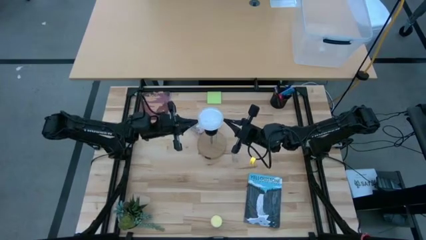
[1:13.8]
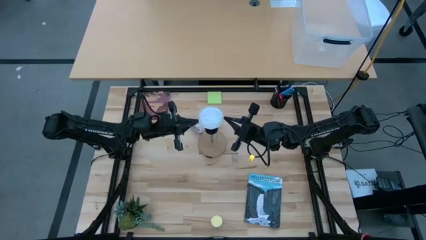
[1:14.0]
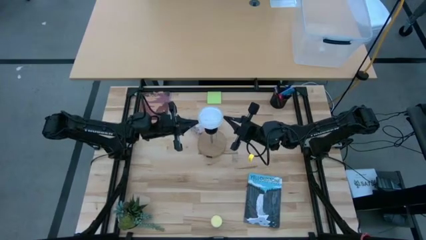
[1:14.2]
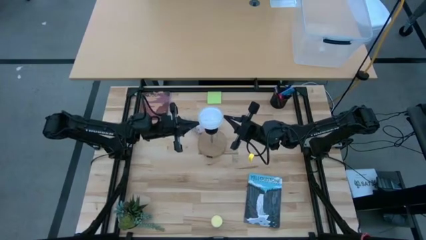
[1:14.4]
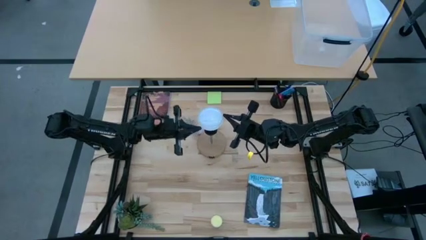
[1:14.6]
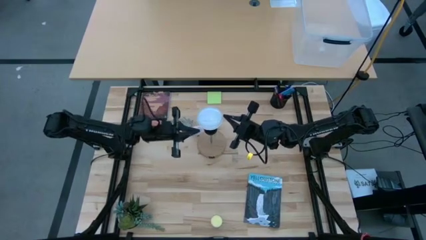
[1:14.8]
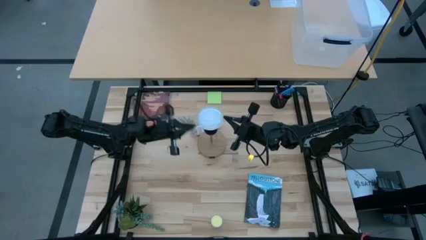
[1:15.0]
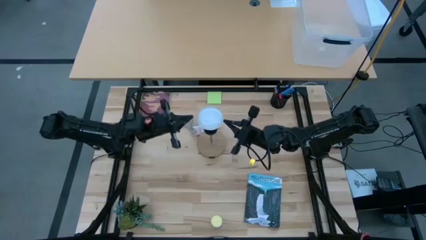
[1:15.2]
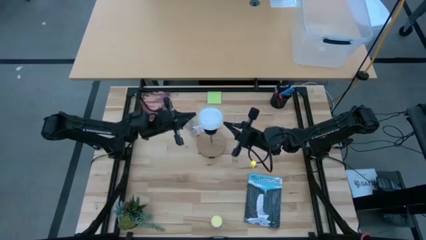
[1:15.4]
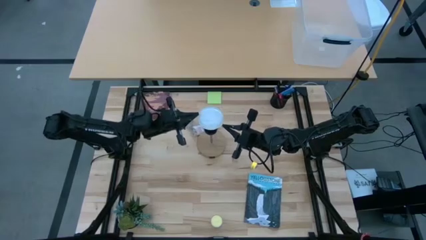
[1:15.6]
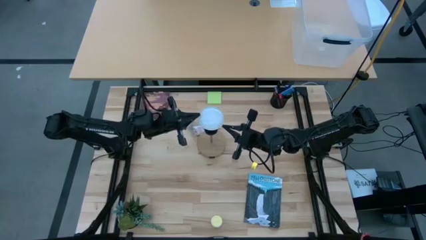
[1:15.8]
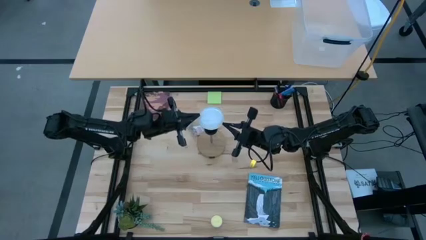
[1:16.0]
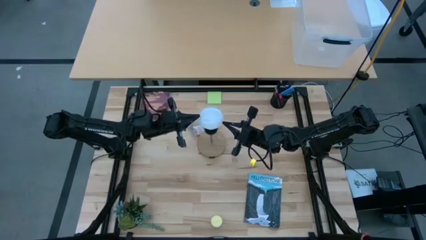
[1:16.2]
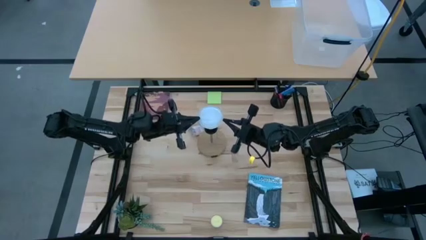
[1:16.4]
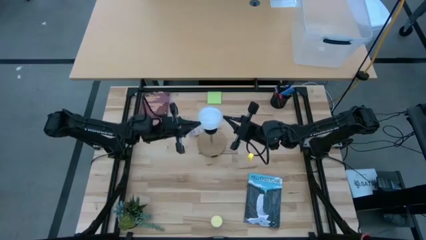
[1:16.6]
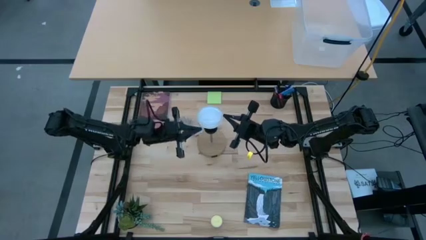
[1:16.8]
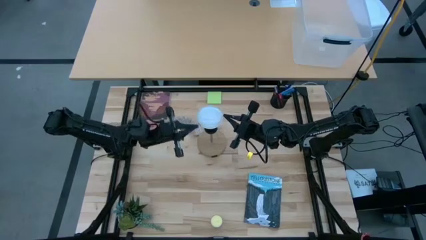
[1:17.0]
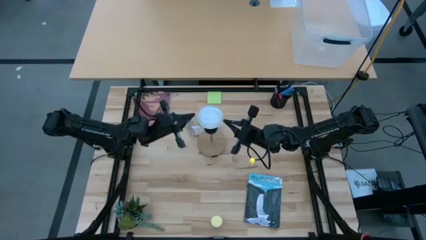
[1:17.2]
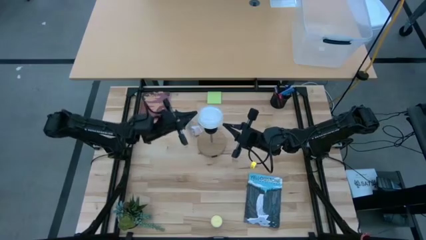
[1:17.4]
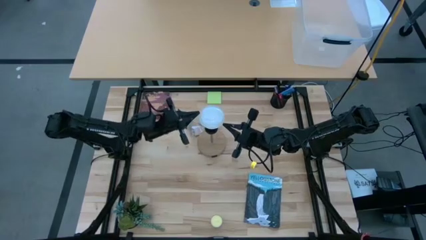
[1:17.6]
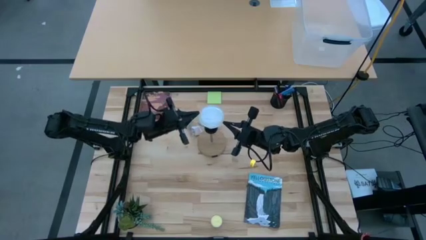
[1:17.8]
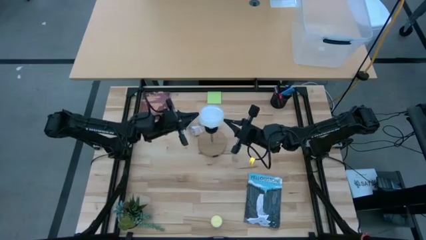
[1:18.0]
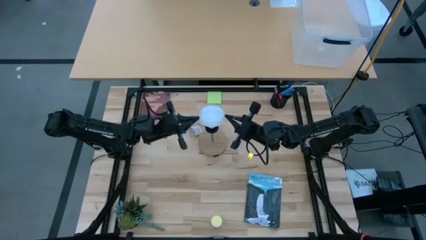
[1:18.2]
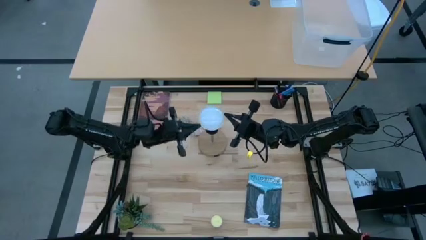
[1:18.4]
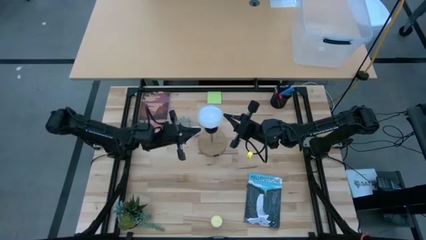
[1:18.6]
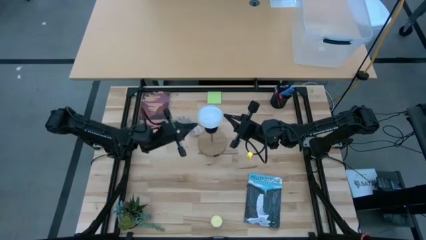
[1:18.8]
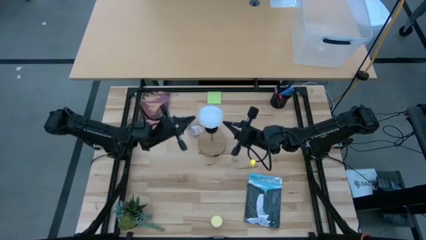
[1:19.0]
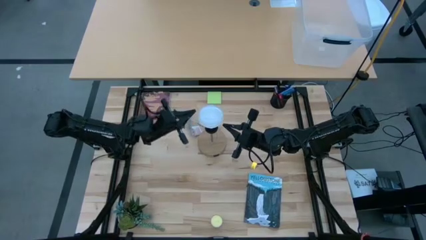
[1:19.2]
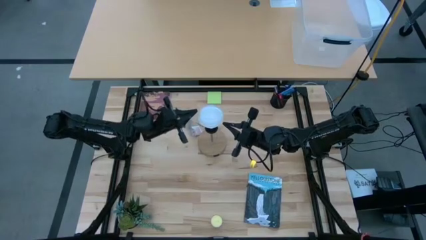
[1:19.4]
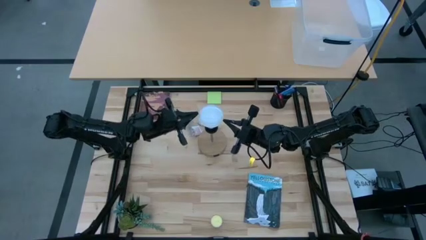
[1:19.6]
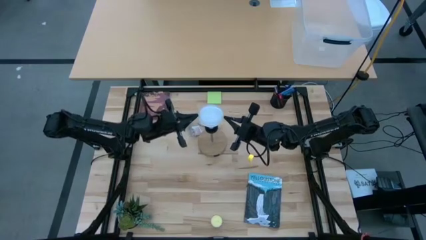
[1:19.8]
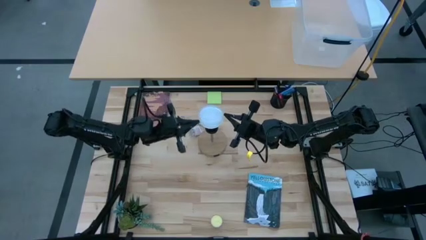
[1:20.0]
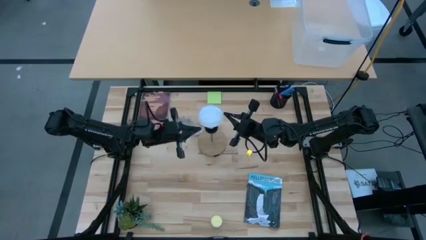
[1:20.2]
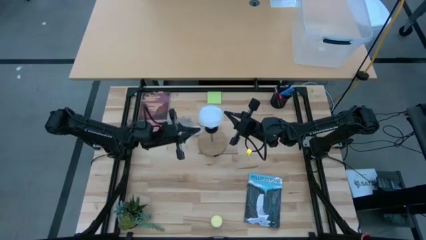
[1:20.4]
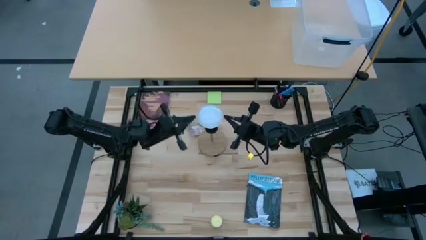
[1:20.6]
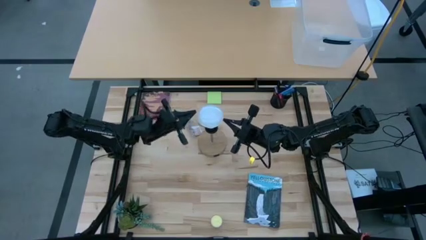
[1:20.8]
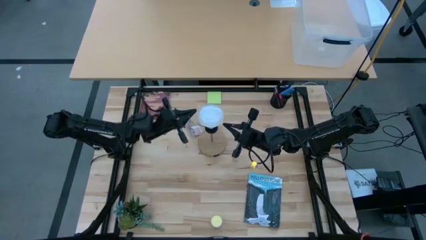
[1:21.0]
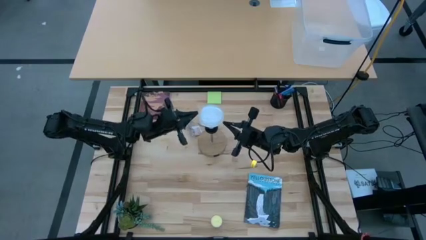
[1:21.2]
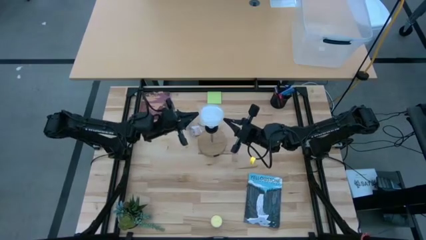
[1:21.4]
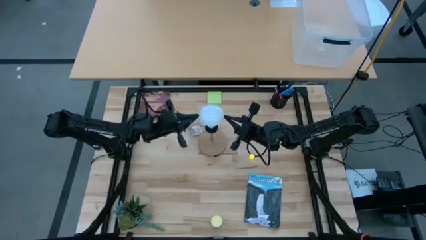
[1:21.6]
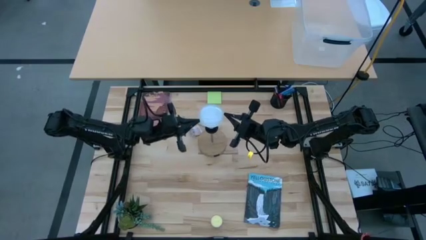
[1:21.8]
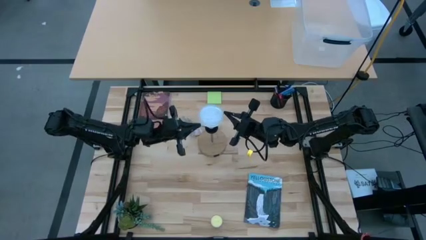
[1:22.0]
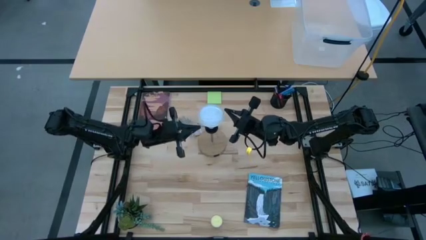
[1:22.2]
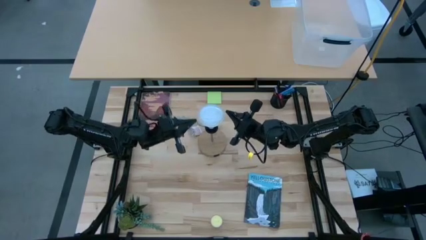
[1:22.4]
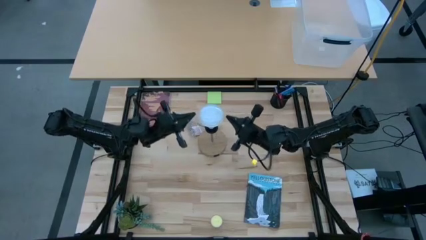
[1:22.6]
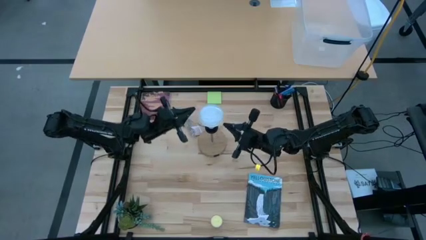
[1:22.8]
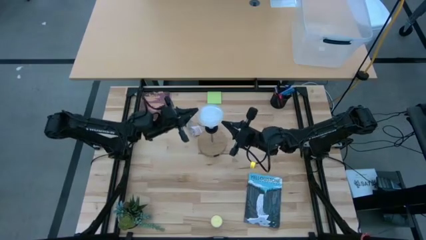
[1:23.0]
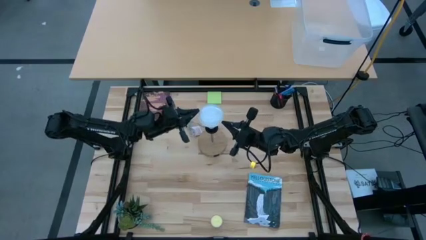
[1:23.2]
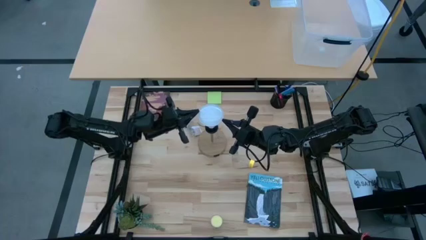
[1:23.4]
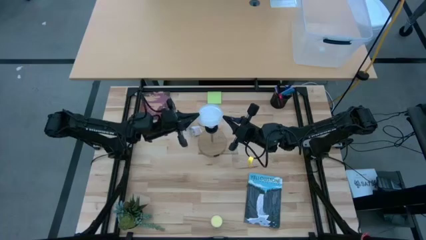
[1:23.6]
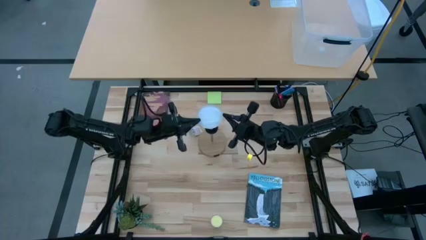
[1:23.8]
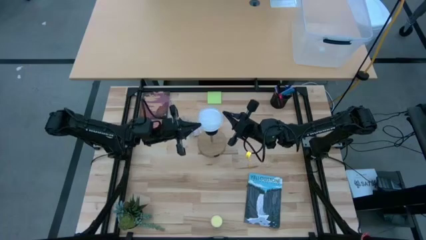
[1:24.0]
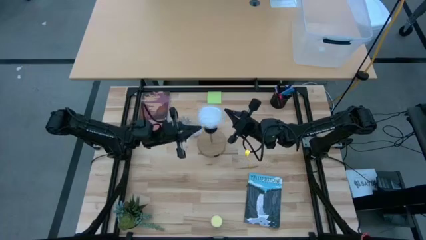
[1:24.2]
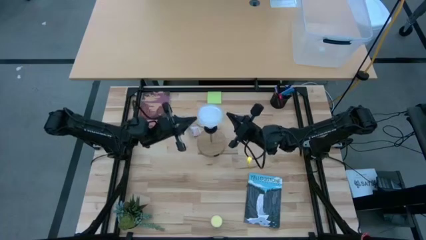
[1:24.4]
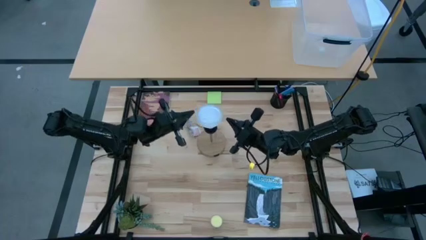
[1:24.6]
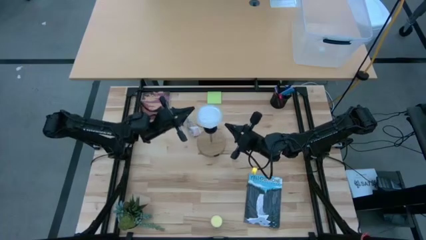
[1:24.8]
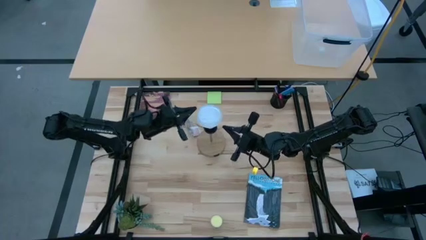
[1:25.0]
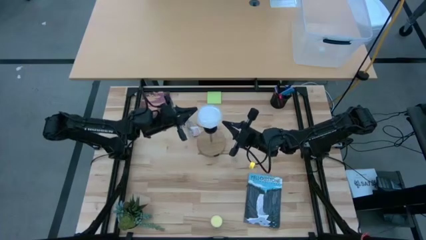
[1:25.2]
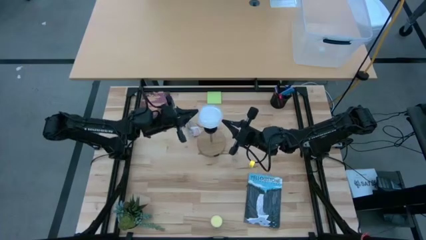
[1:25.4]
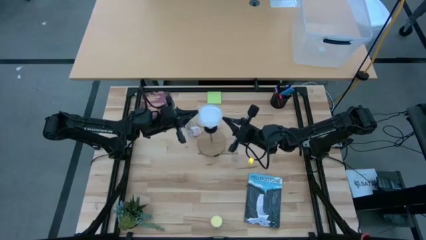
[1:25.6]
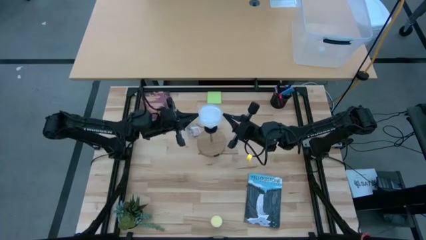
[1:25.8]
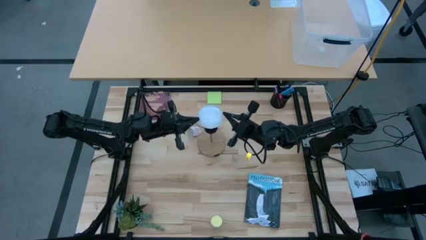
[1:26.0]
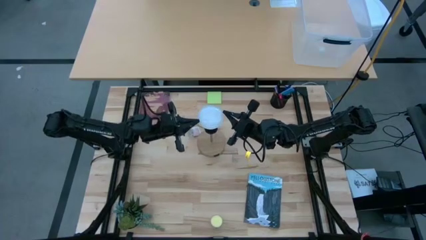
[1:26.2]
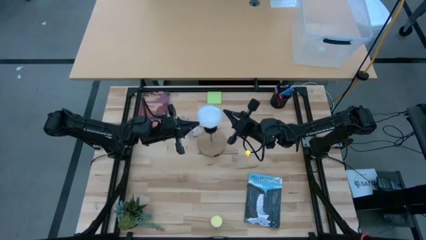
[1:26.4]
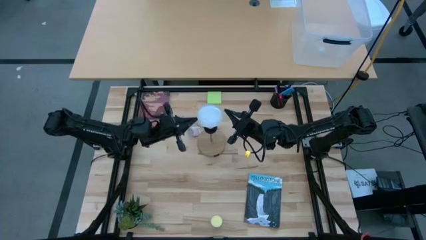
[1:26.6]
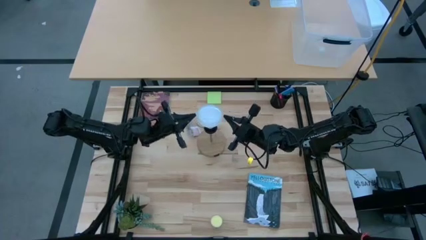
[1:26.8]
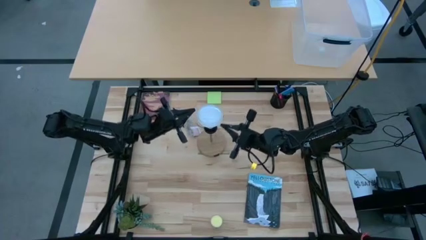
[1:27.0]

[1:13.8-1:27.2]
Task: Screw lightbulb
Remove the lightbulb from the lamp
